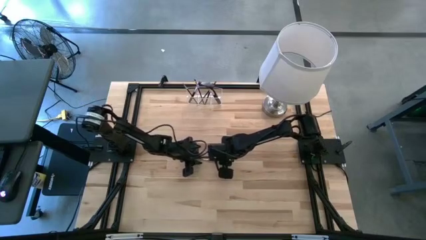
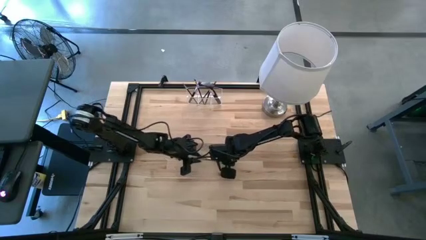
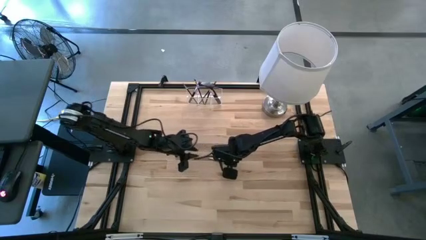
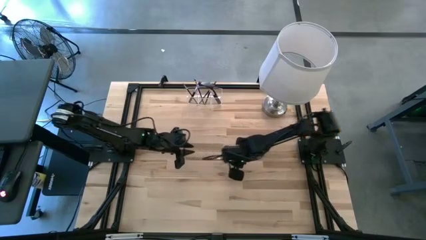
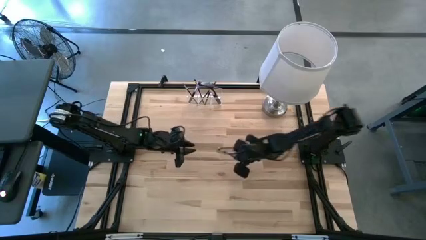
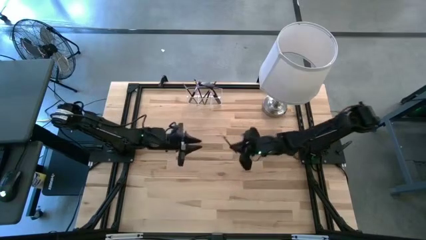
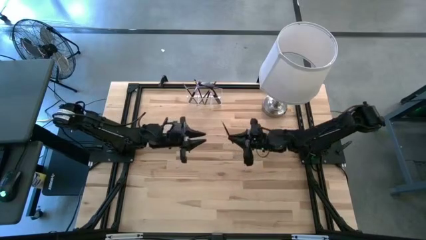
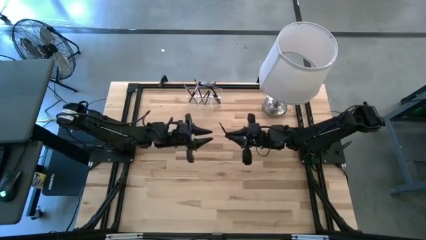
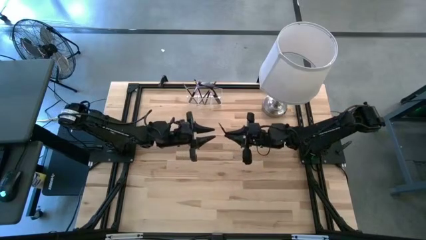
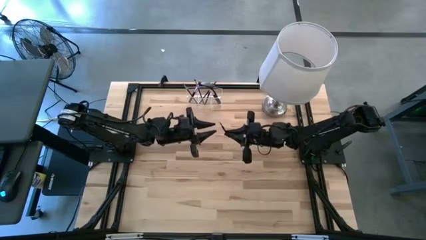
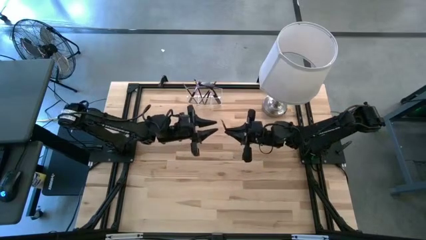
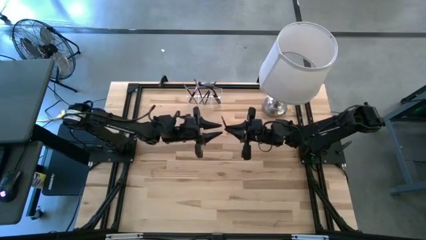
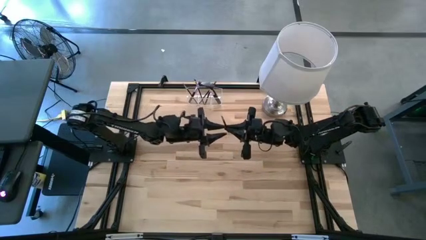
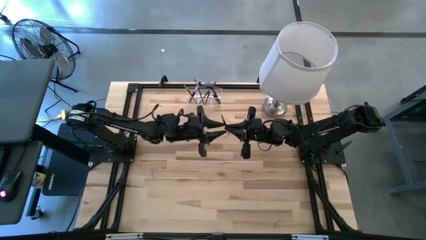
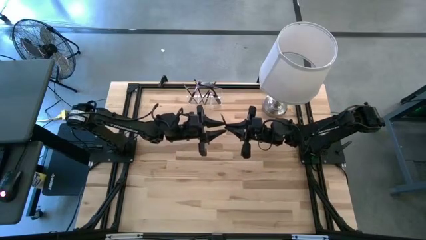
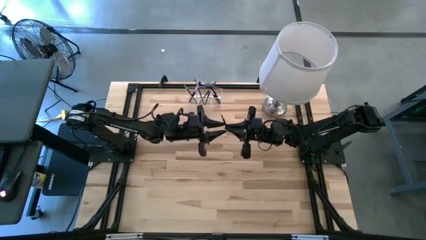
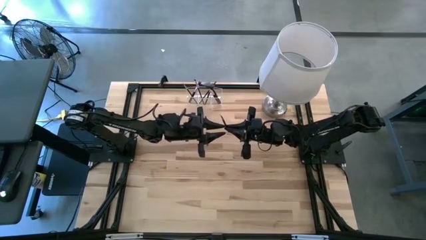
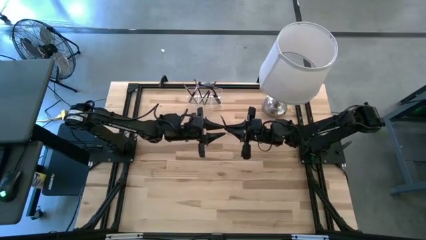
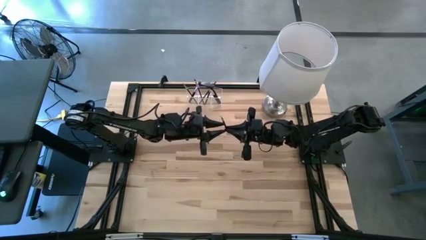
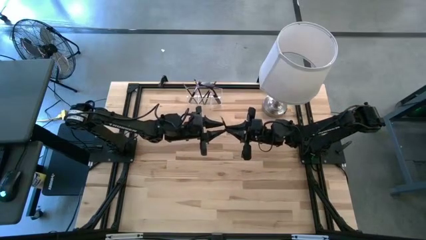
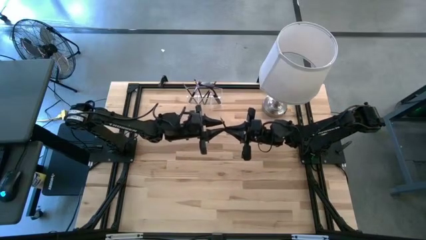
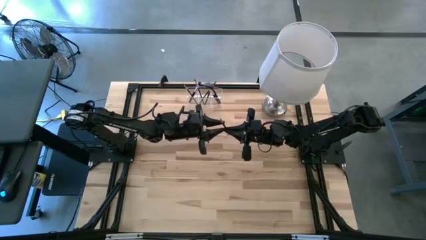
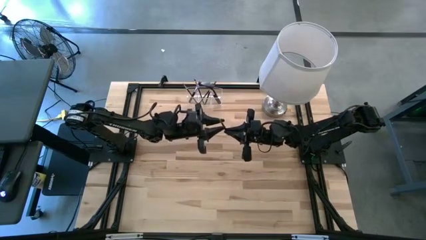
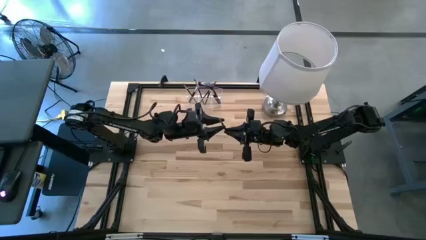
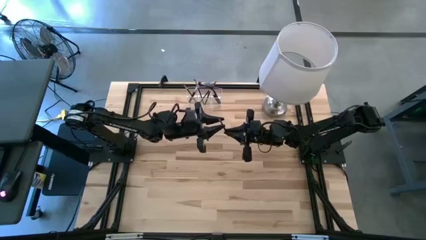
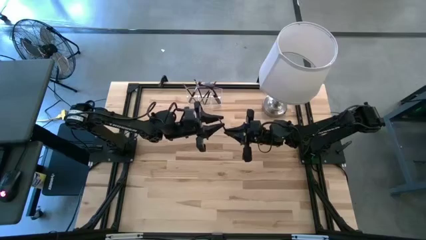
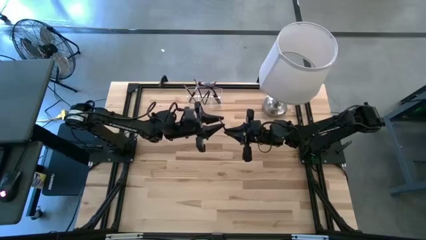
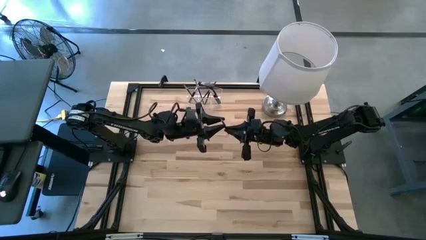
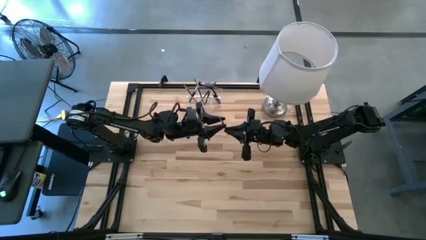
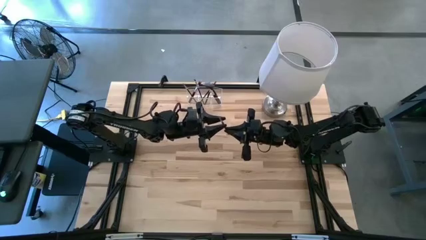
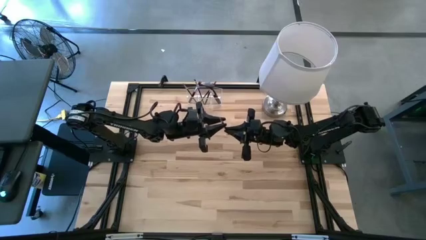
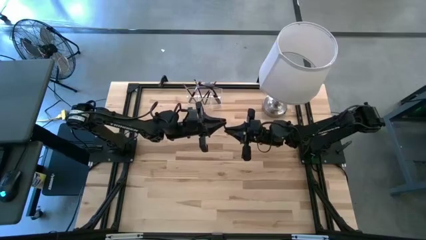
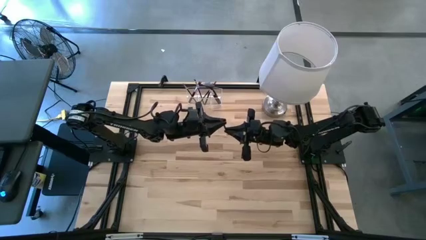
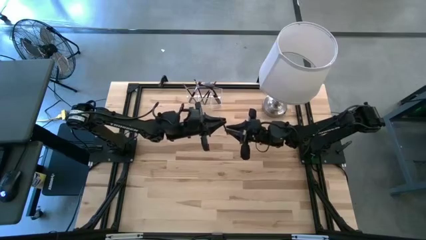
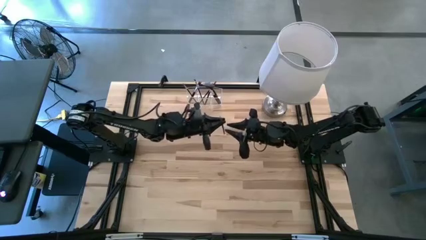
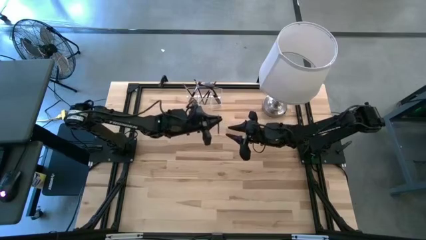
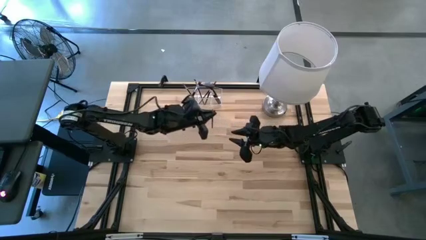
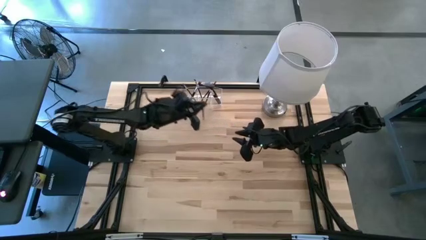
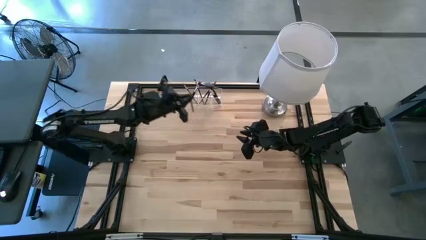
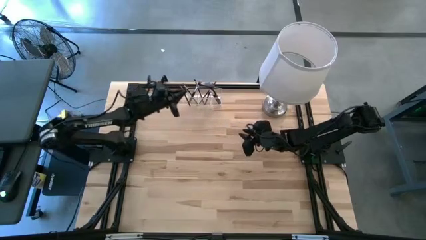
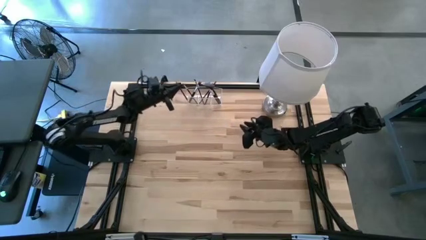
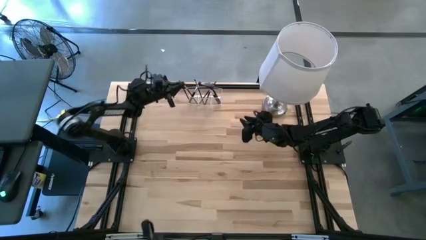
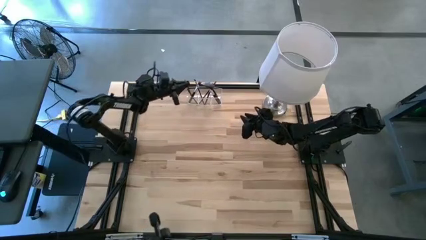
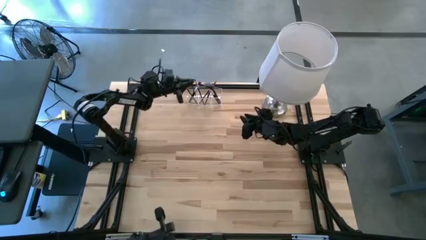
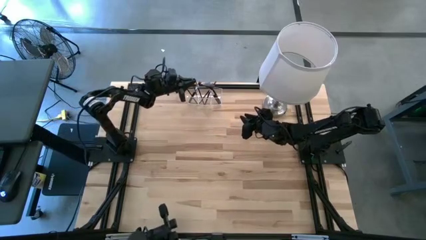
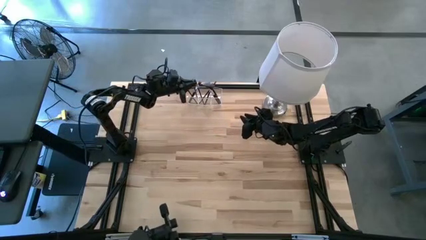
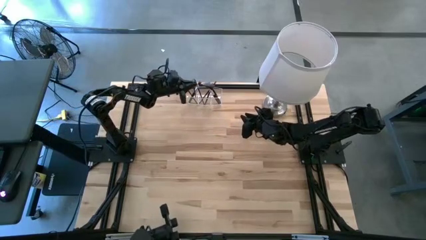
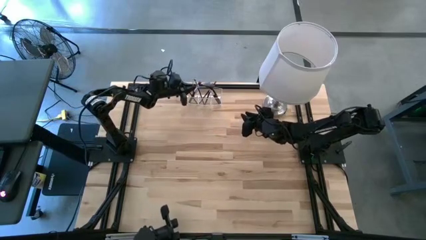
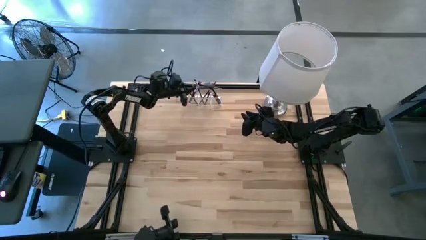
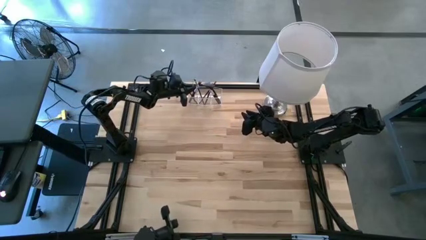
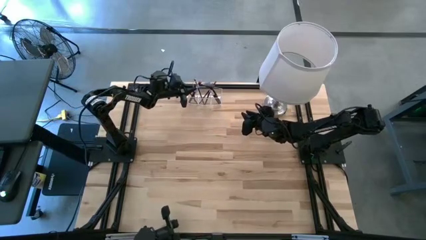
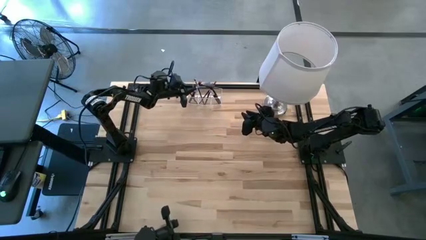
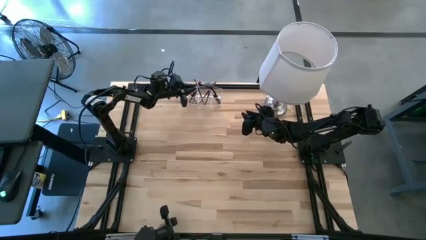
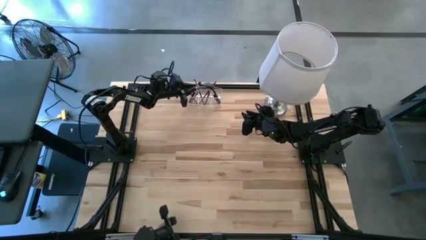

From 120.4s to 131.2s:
Task: Put items in baskets/containers
Put the liner brush into the transparent organizer
